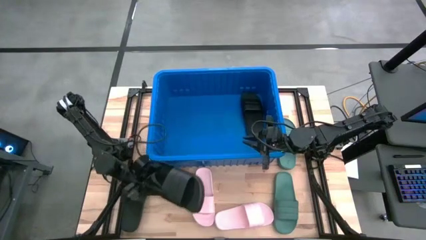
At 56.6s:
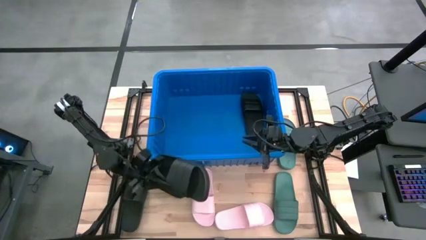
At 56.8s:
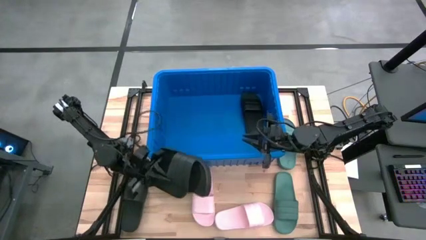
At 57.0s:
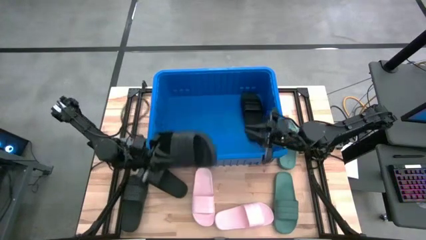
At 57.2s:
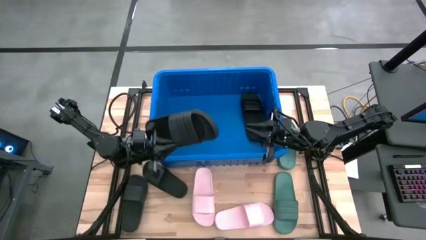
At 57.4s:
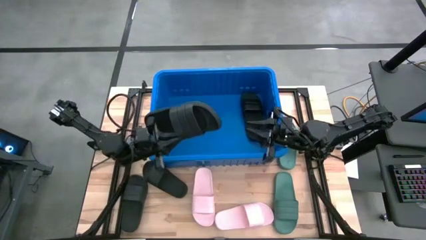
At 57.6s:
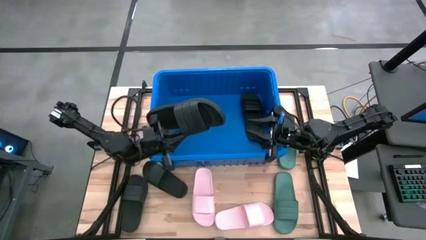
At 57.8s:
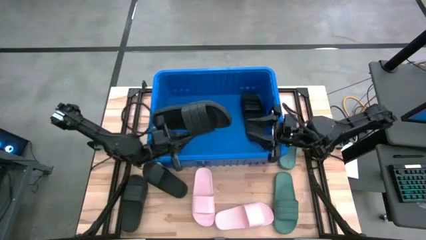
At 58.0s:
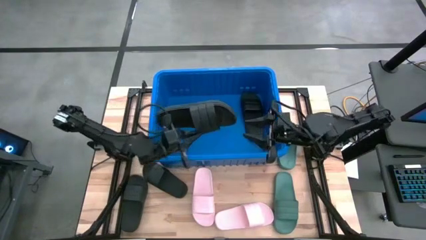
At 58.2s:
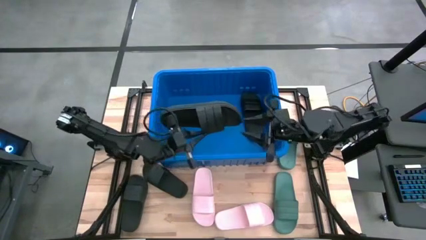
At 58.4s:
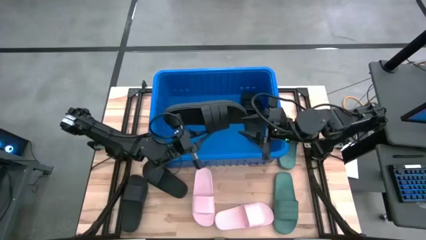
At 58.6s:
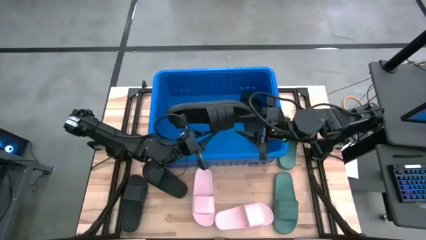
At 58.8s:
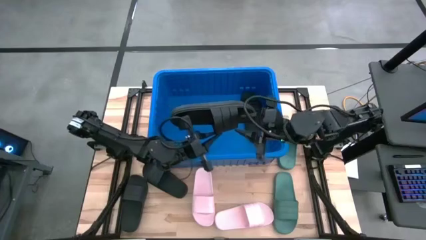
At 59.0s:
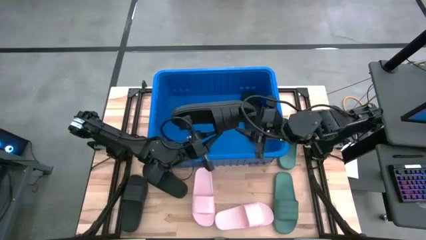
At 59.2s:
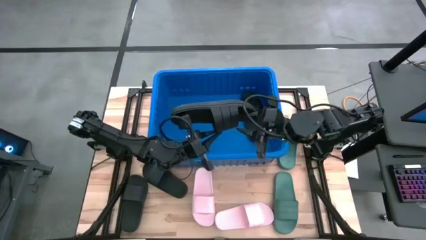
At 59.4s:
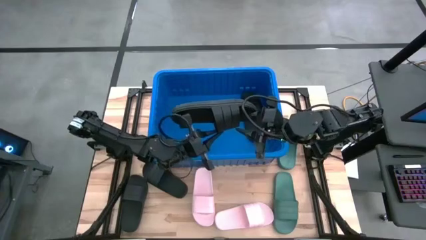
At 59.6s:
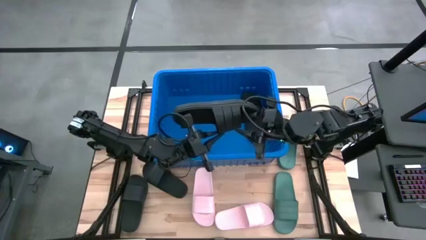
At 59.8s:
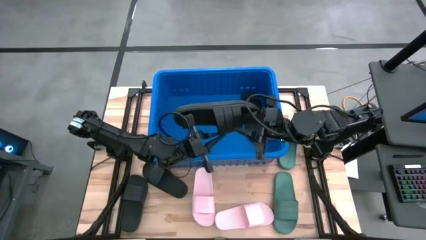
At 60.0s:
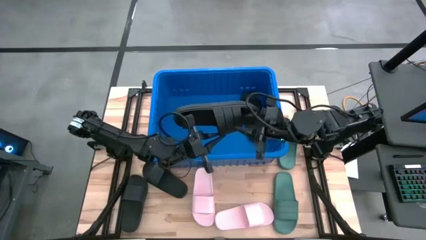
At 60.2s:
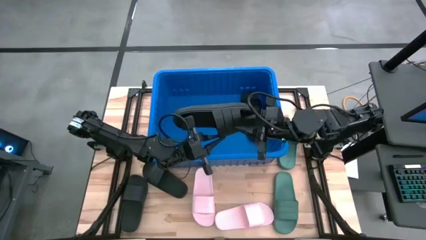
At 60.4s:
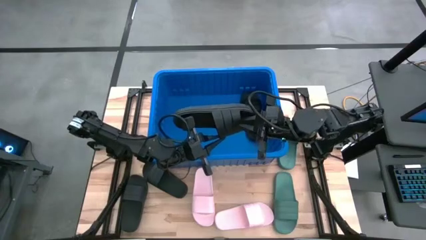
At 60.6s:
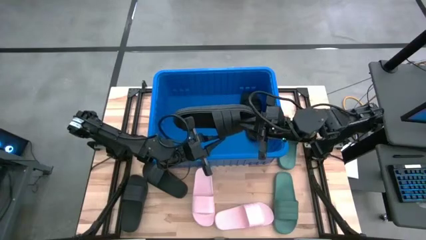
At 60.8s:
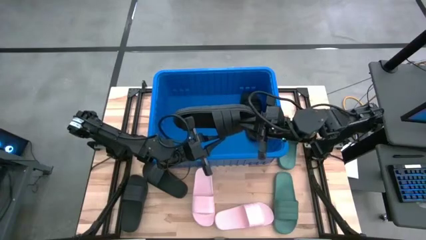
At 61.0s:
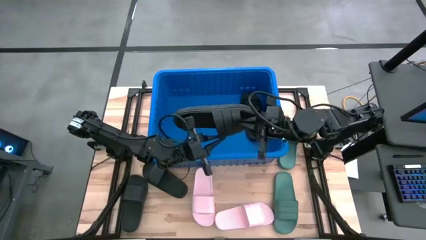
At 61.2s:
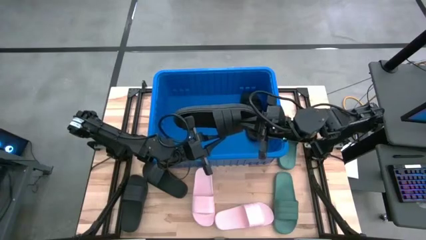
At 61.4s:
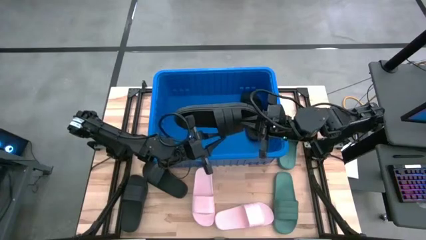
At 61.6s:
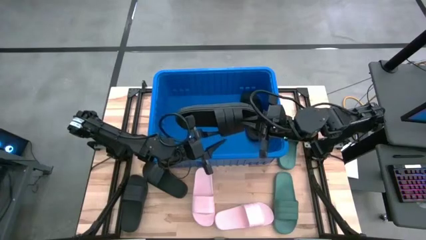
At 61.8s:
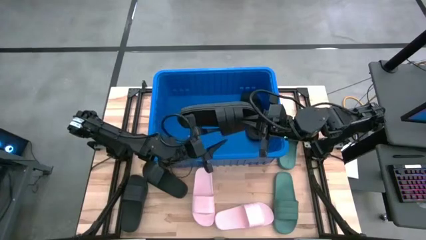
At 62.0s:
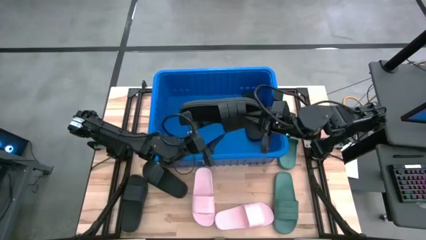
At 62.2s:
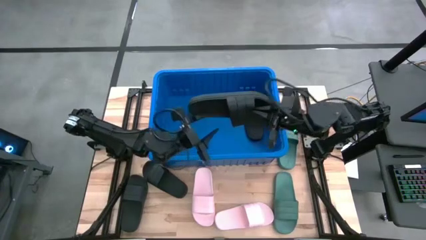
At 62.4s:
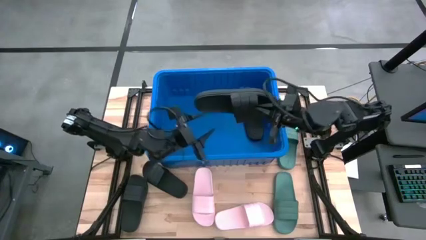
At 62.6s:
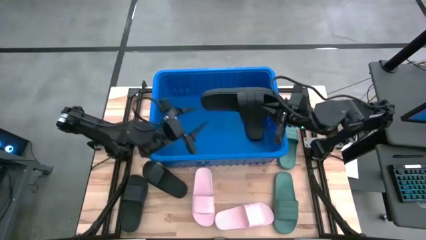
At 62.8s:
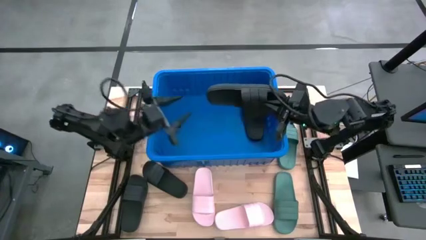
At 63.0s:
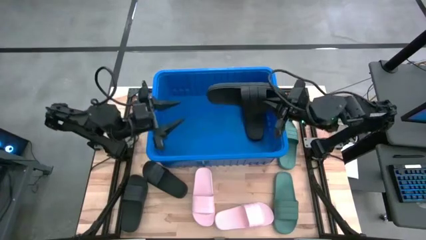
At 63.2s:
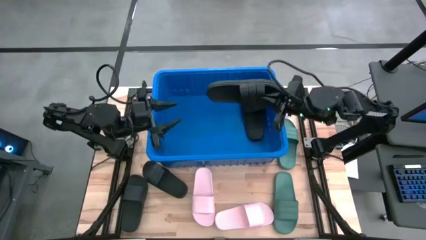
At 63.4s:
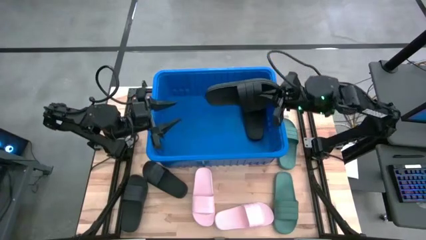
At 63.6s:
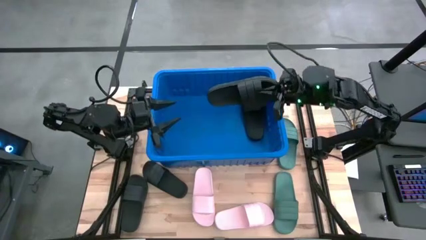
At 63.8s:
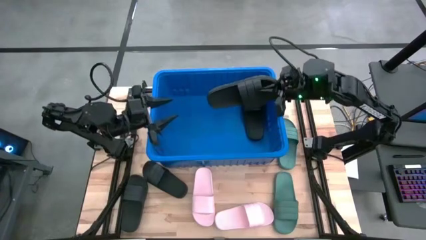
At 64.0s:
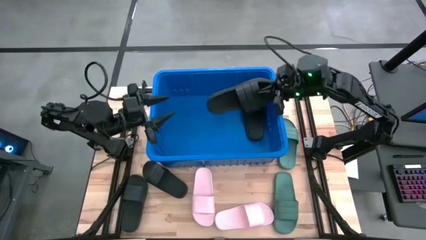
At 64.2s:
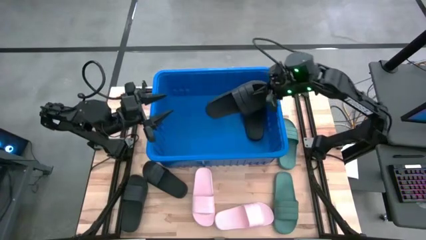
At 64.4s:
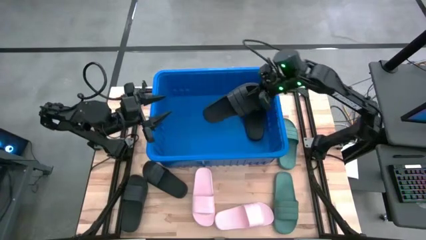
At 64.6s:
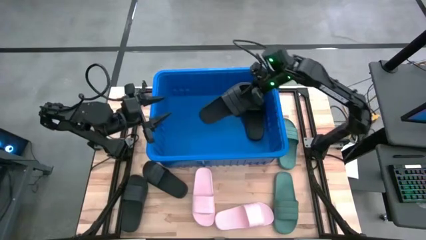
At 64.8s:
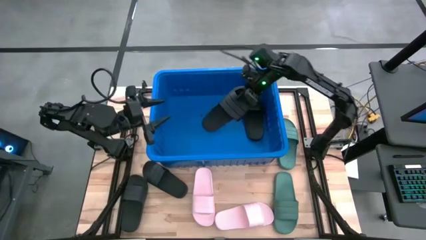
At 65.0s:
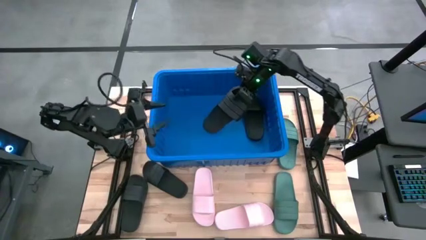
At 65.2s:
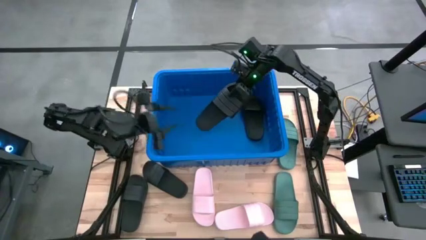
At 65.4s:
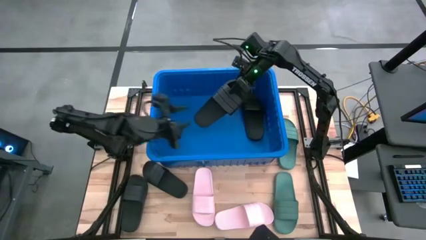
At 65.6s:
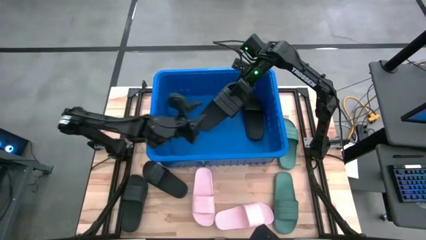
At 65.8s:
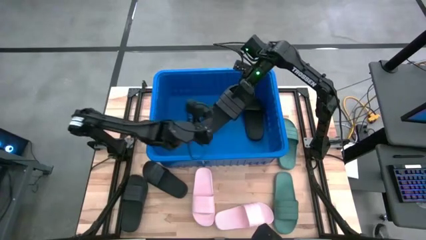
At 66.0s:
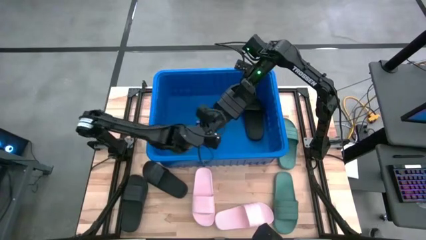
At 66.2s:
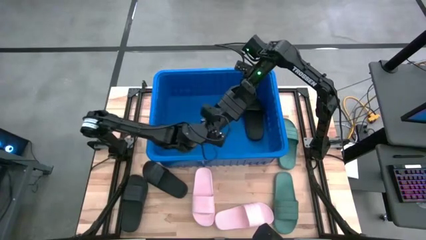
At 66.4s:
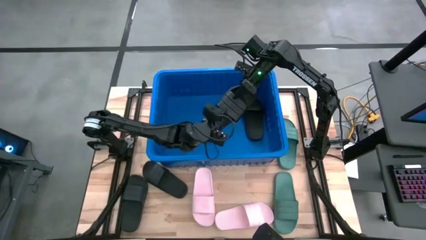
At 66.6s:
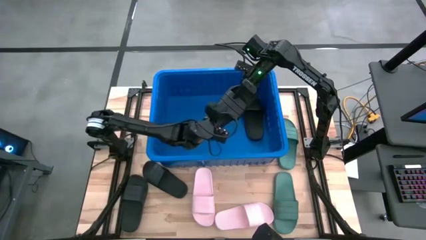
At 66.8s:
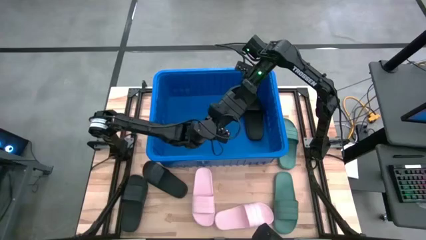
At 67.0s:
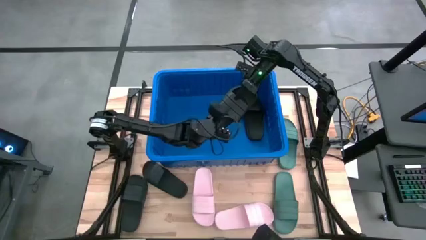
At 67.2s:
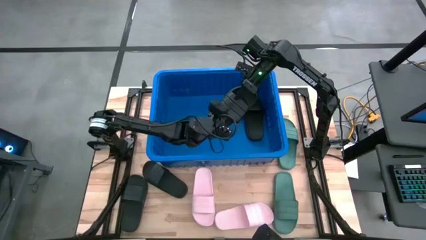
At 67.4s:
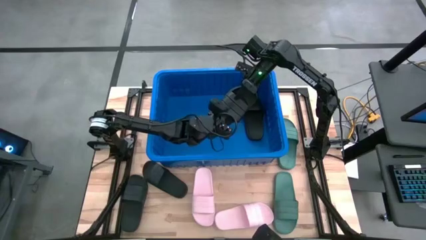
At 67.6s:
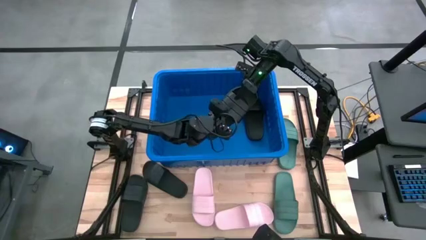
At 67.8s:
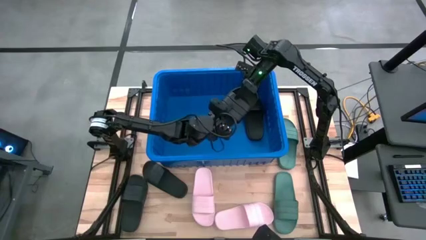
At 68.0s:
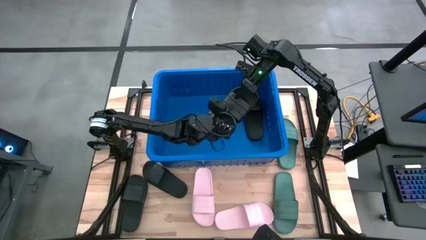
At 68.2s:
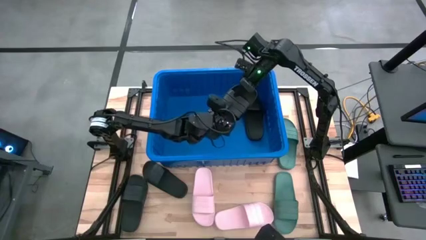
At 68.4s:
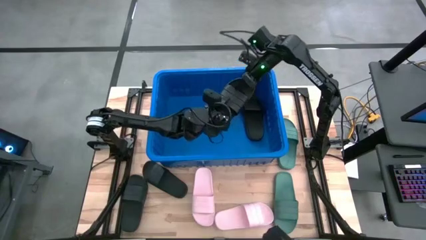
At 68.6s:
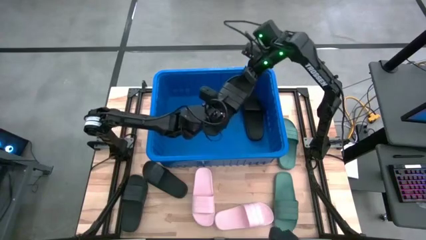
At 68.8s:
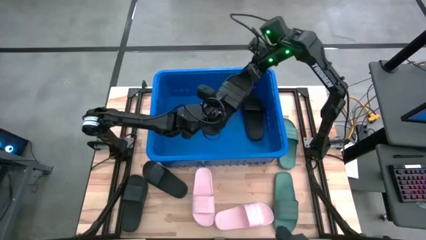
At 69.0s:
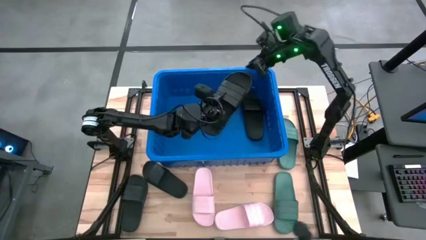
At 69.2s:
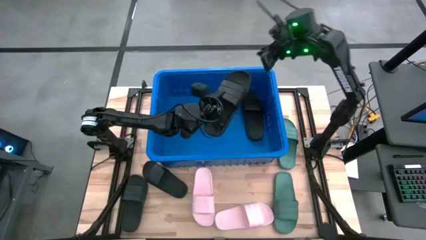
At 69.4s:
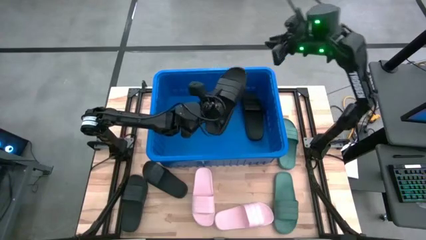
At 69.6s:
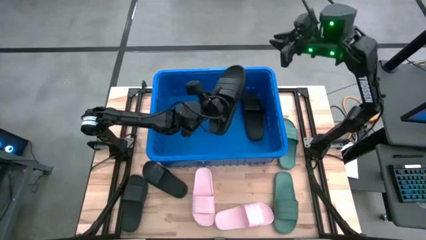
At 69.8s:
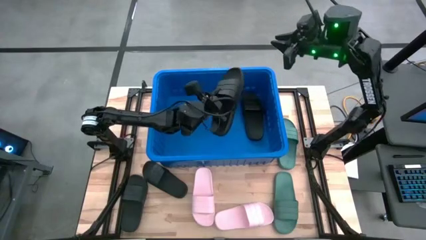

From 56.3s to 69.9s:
Task: Pick and place slides into bin
Put the black slide into the blue bin
